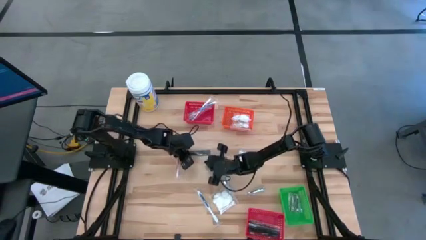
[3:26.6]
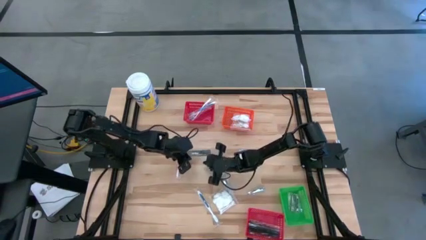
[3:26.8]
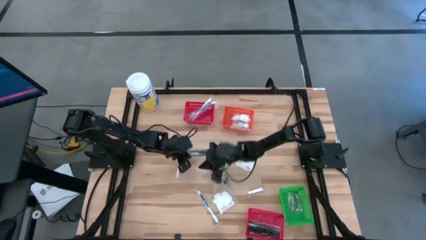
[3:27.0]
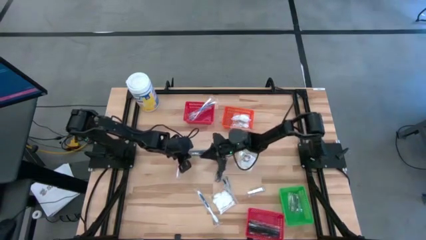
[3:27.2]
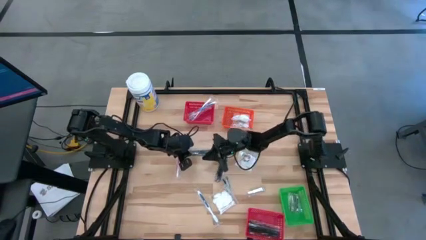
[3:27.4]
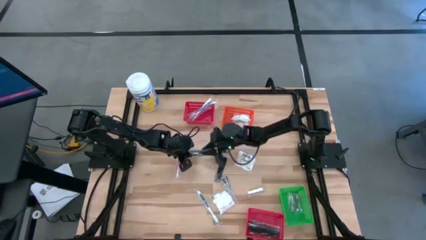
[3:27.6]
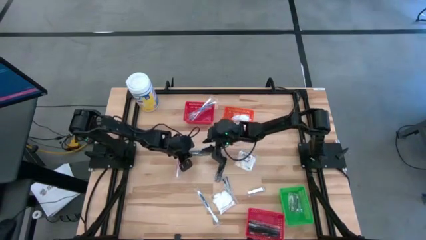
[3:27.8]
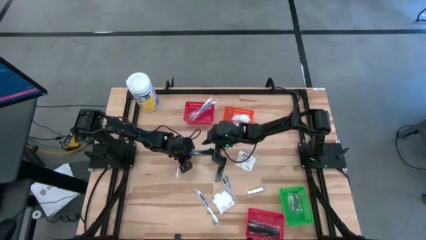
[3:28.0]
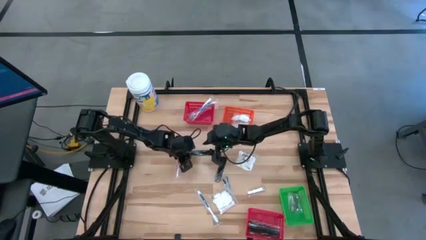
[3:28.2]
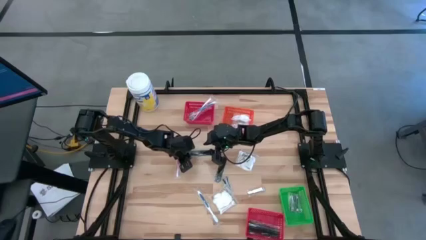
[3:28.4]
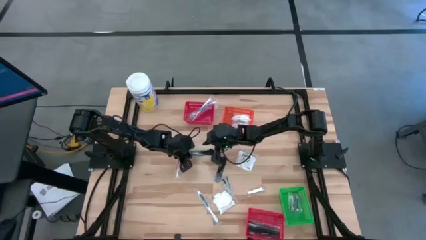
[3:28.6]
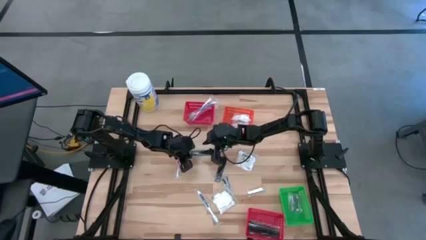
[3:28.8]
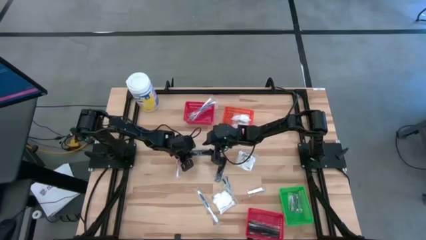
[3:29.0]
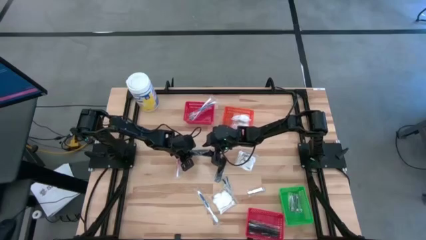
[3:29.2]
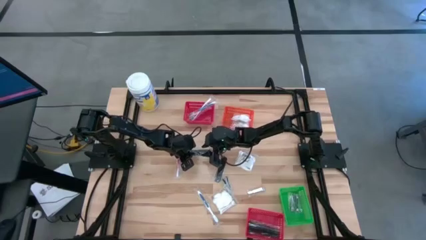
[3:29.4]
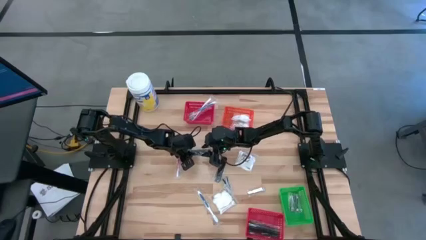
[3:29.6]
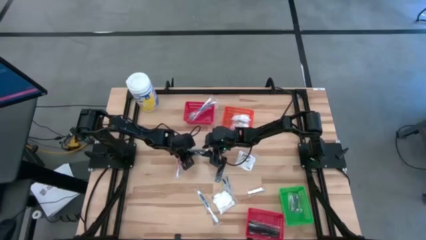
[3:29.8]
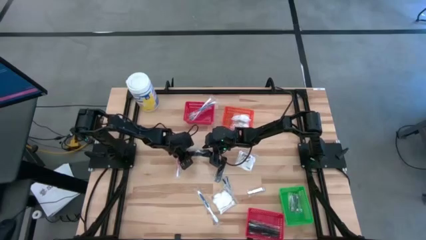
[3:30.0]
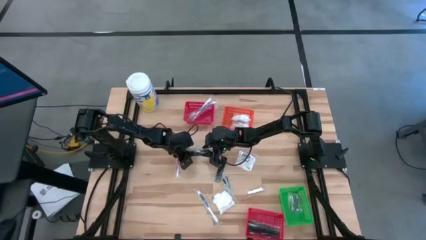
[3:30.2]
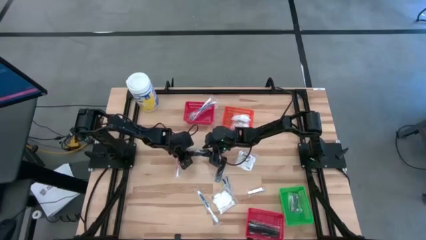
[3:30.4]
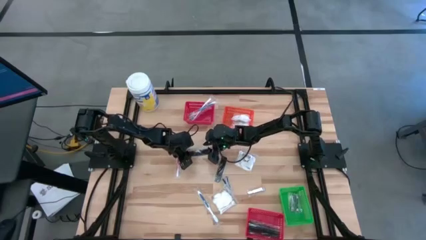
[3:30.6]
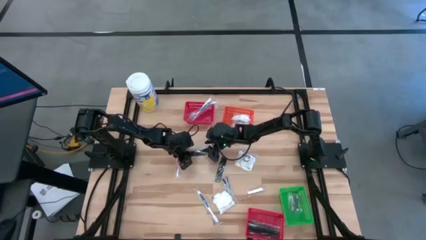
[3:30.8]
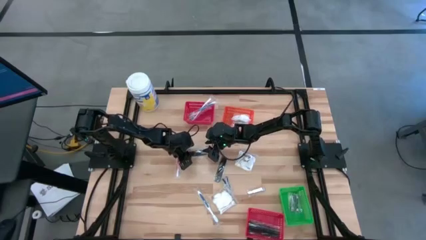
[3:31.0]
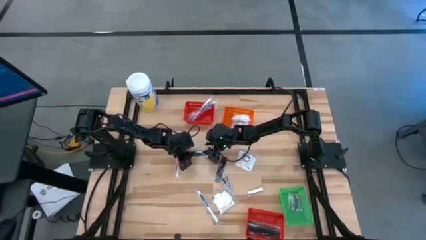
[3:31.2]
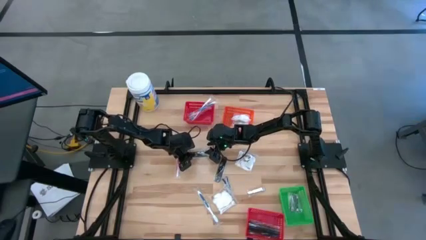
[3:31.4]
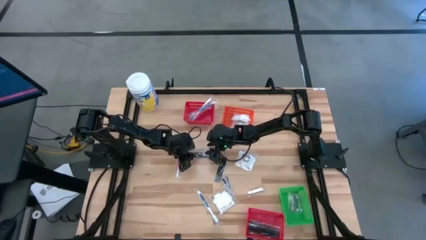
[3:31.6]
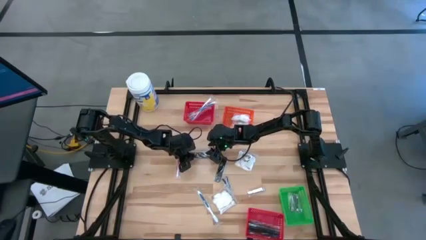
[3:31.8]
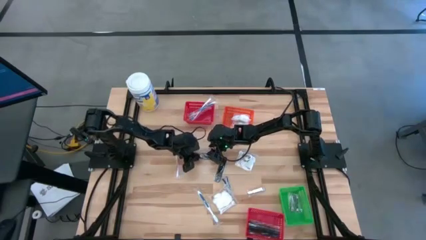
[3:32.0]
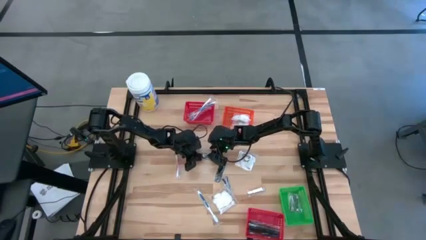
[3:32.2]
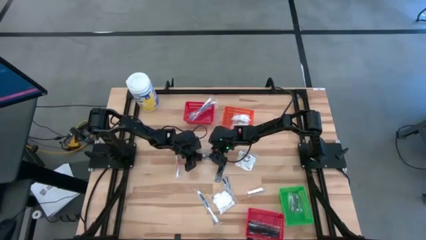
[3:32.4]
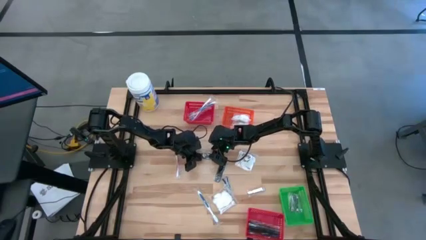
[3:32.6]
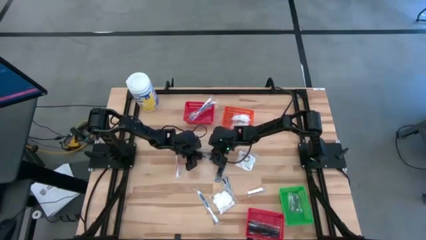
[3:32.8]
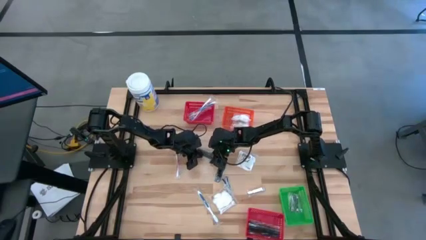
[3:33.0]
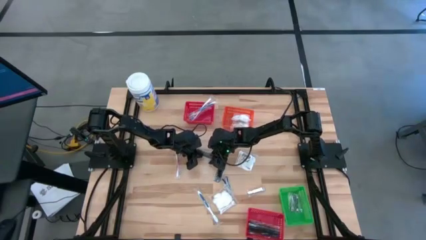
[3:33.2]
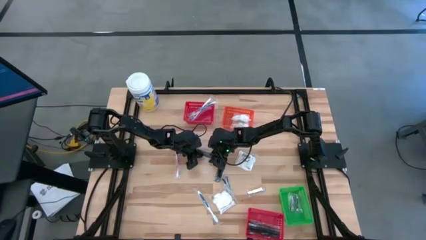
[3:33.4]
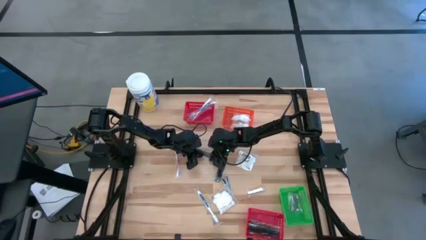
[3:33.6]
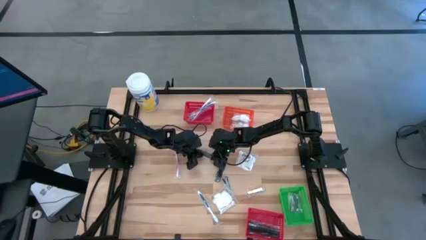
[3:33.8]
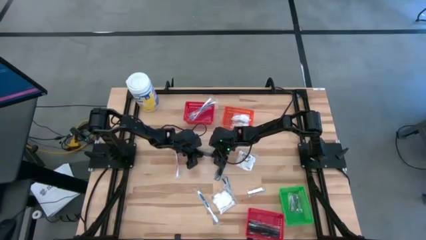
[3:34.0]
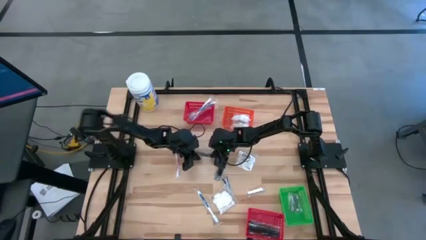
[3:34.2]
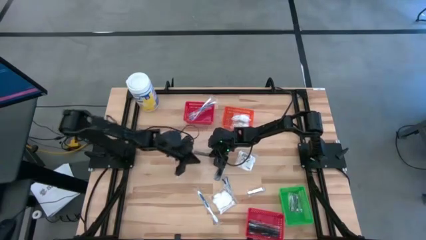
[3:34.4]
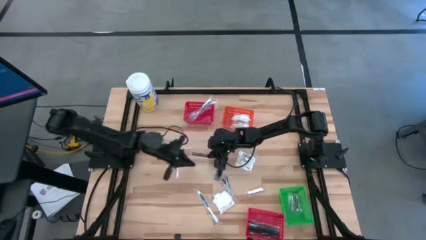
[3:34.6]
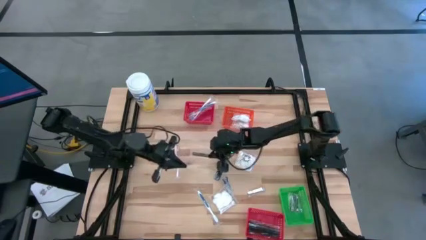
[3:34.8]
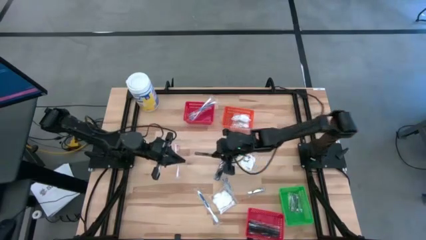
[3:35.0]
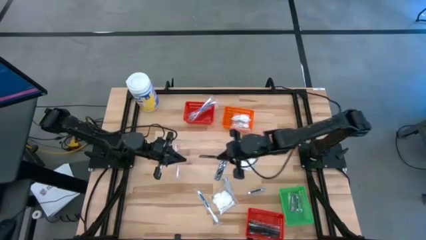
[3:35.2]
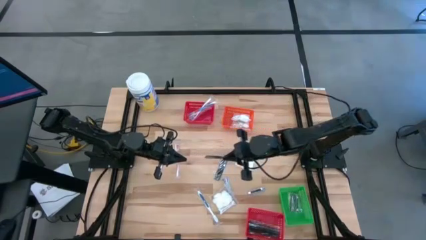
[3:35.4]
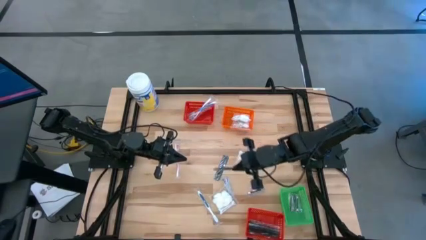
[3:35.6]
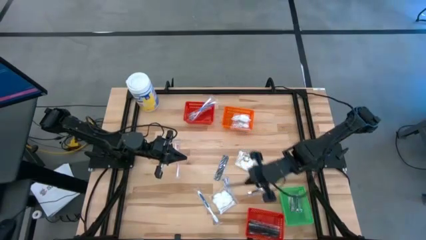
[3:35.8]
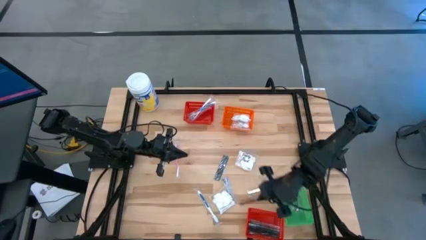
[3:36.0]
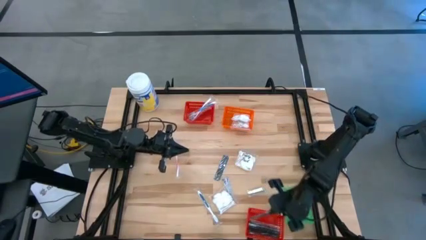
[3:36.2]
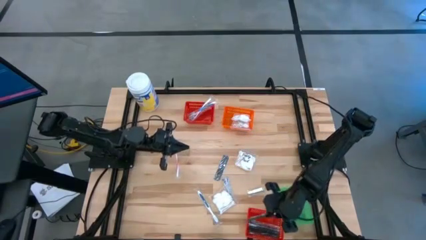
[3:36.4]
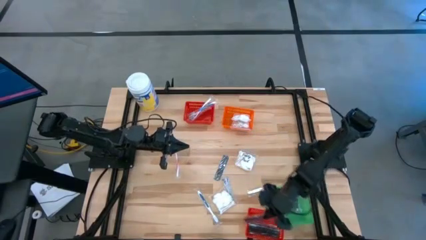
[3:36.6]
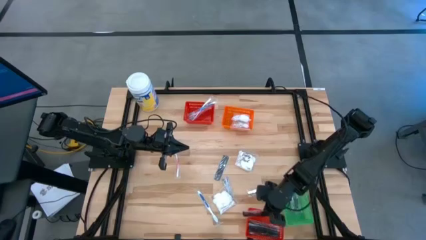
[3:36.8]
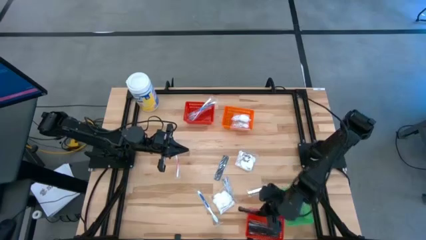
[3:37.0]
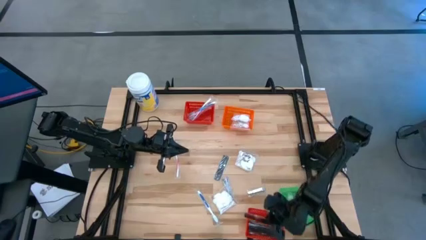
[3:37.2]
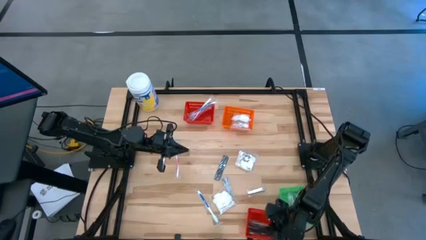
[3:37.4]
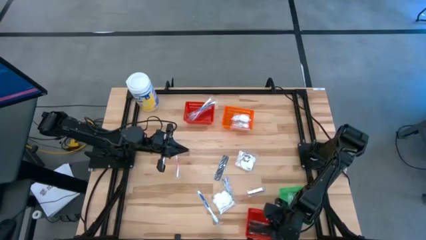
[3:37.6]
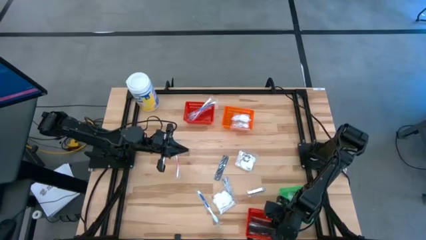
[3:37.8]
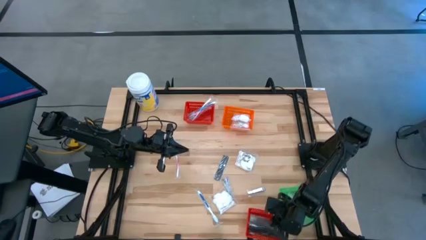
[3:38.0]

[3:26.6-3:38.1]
Task: Pick & Place Travel size toiletries
Put the black comb into the bottom red bin

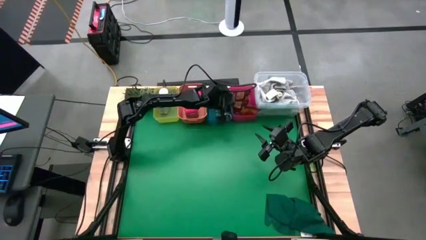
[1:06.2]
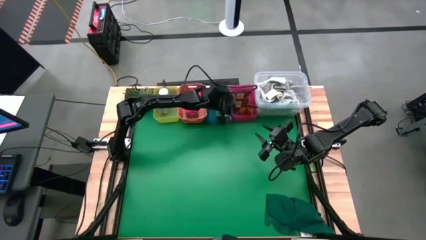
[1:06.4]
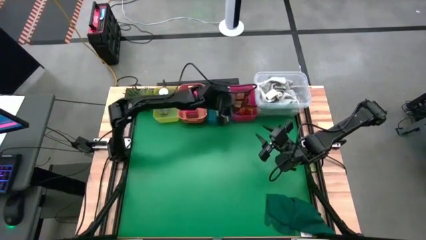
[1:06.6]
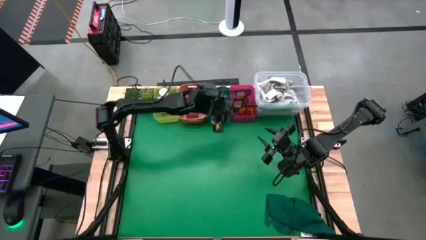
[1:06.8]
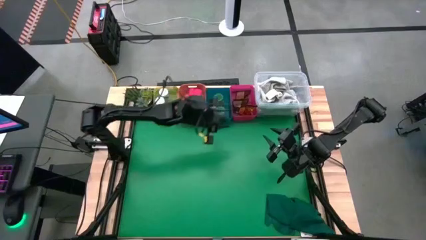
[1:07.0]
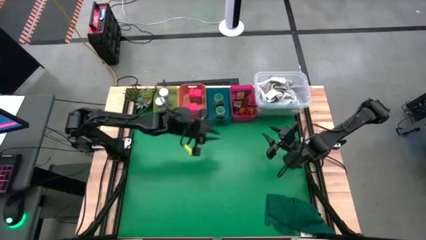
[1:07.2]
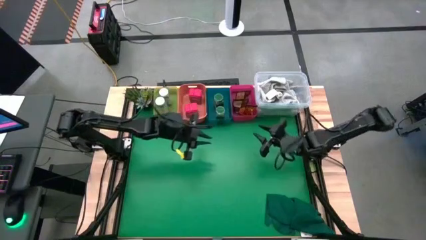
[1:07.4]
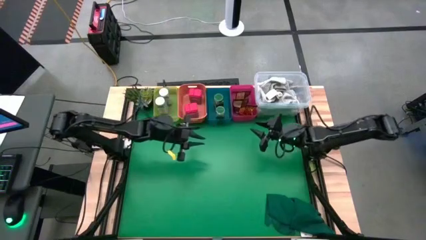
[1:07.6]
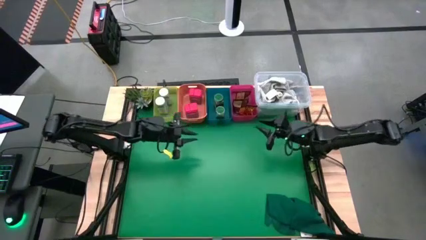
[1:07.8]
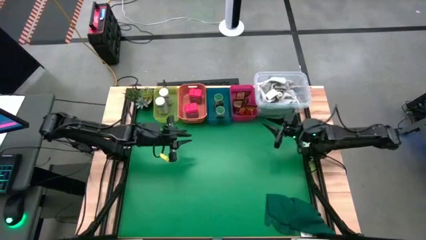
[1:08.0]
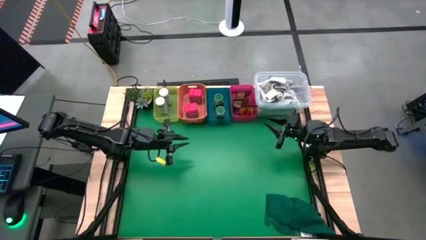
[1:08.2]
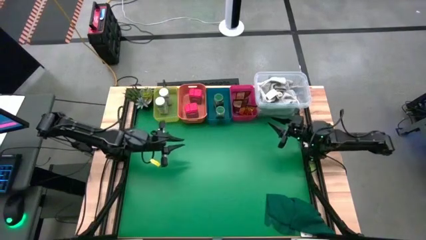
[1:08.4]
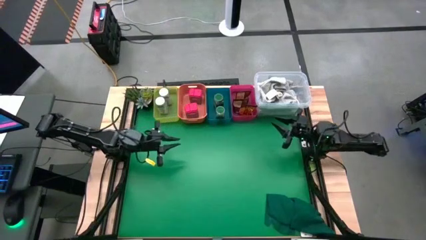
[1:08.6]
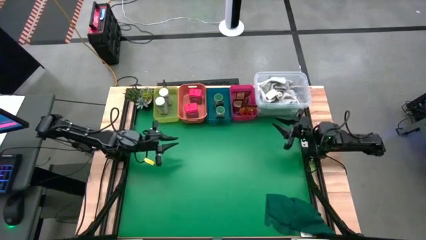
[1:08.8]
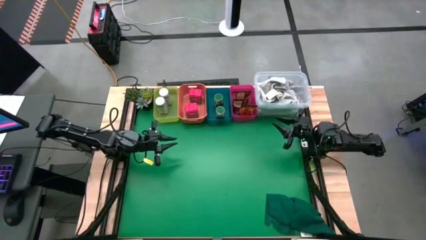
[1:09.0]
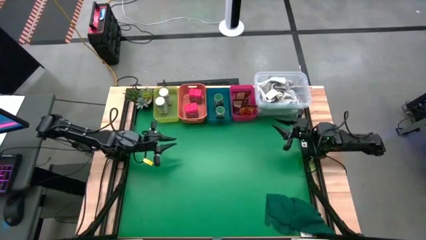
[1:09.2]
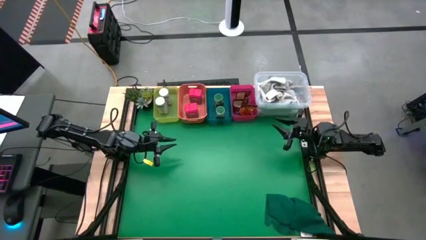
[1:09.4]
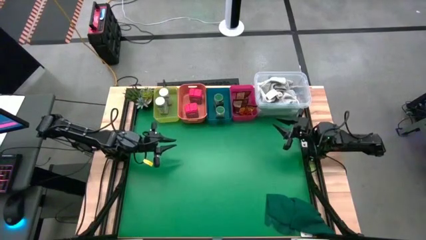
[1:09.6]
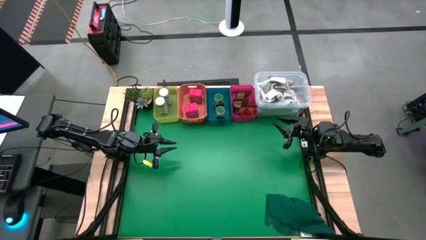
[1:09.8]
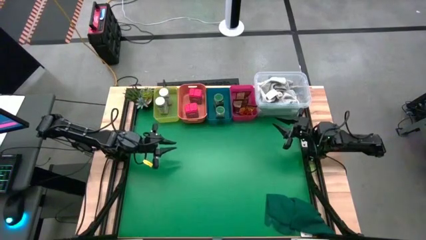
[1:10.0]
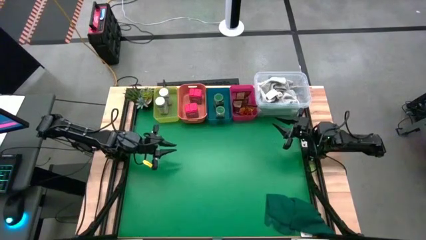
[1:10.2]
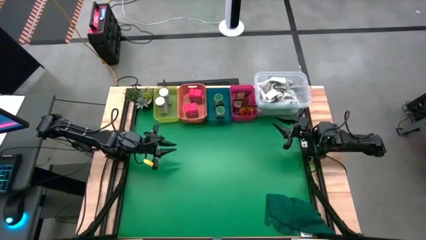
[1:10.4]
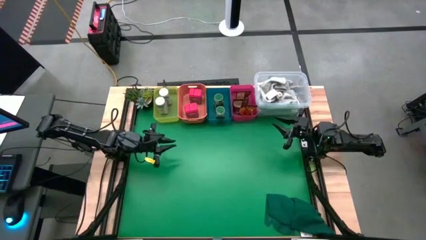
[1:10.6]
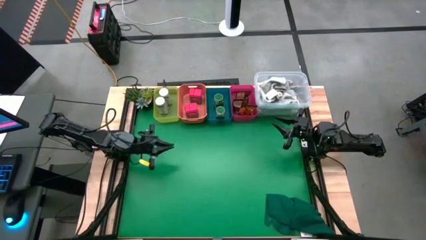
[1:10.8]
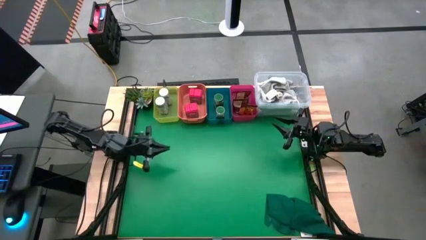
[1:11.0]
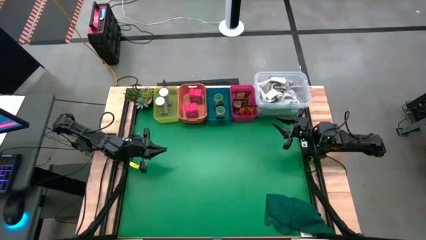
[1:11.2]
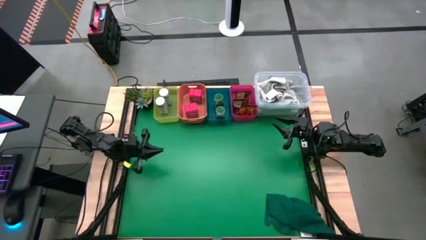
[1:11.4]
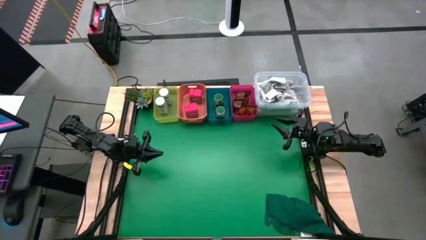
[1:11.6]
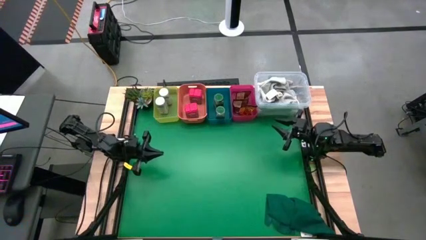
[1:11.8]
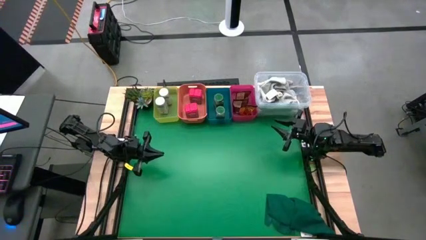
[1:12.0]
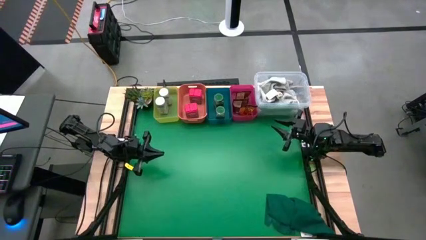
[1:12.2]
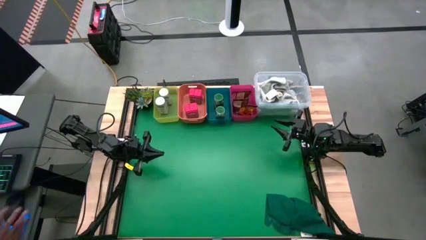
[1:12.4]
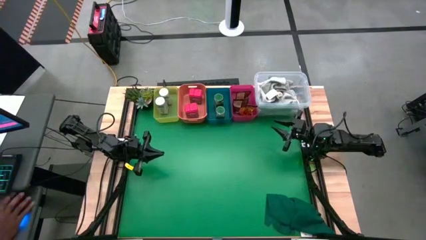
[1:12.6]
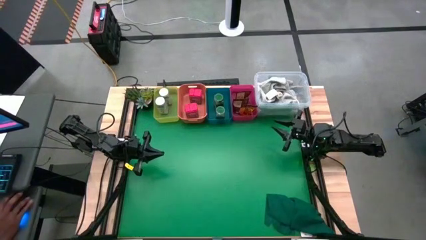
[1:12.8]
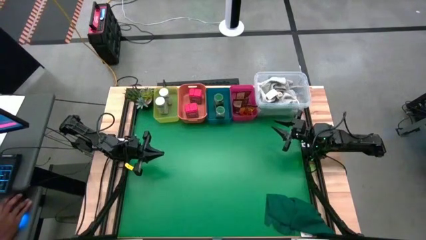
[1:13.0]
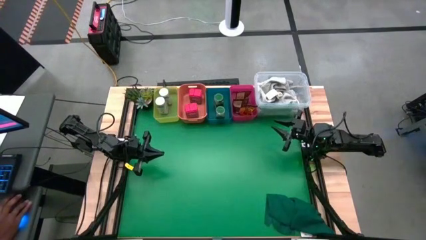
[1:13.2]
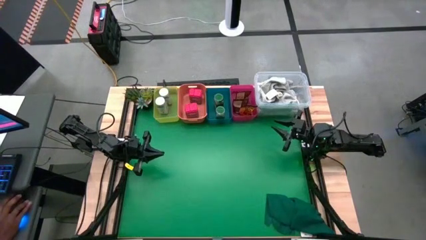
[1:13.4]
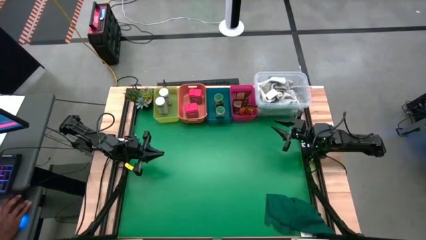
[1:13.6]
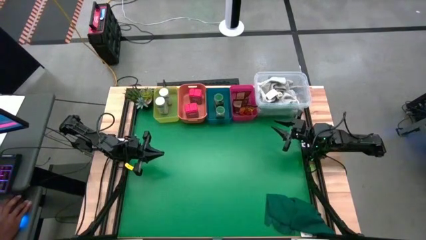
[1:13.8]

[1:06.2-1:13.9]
Task: Sort spices by type
Return to Home Position
